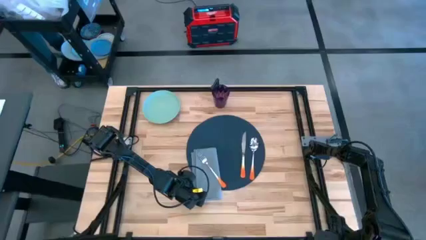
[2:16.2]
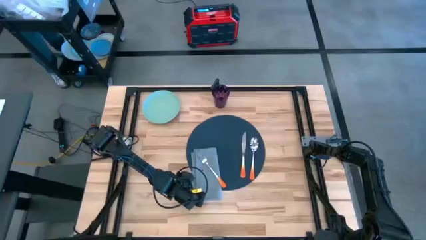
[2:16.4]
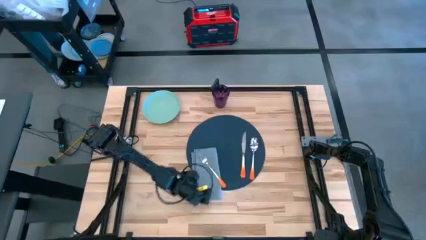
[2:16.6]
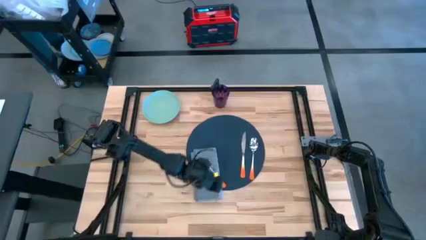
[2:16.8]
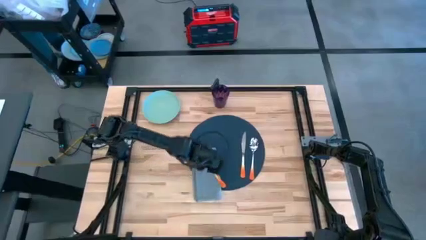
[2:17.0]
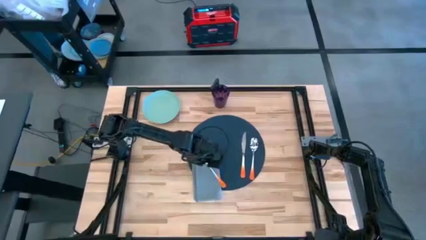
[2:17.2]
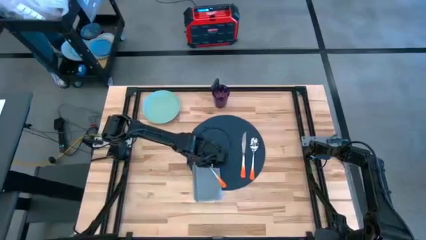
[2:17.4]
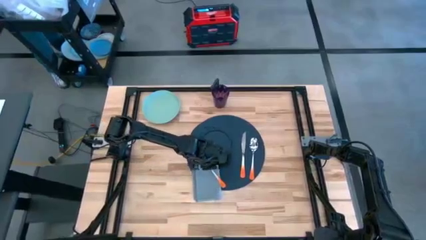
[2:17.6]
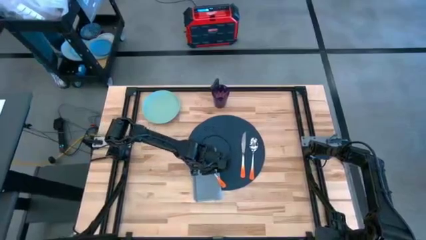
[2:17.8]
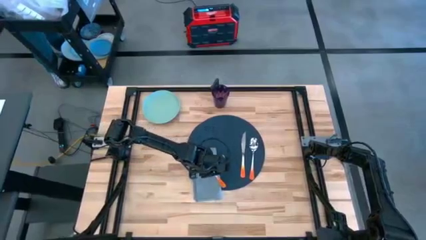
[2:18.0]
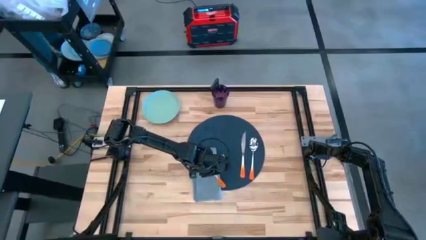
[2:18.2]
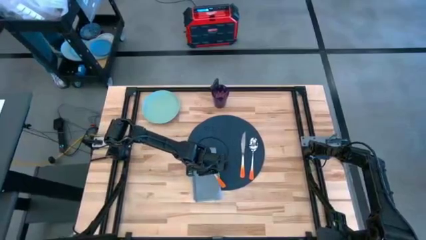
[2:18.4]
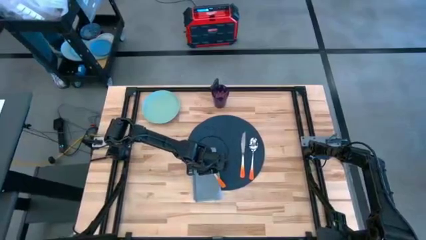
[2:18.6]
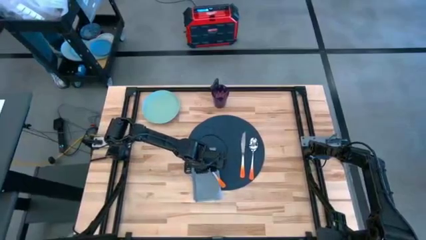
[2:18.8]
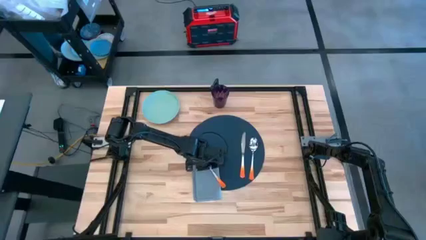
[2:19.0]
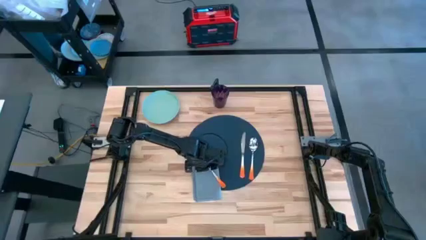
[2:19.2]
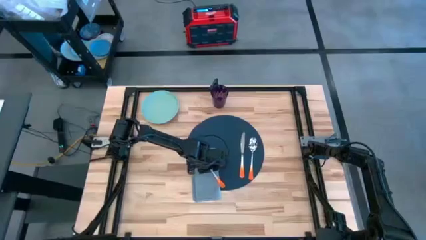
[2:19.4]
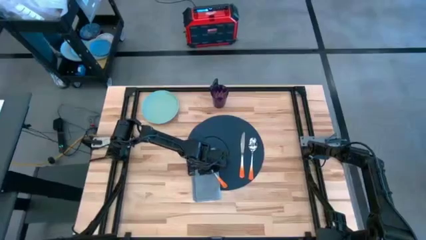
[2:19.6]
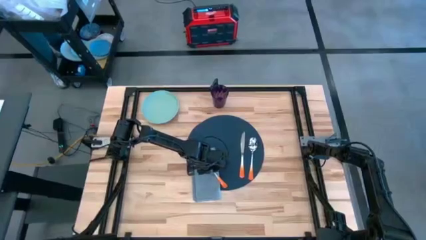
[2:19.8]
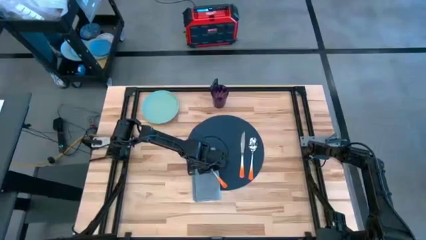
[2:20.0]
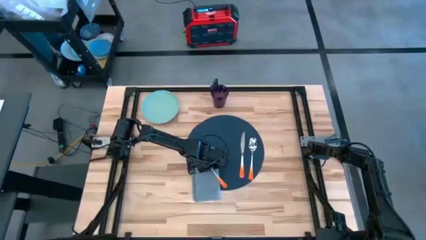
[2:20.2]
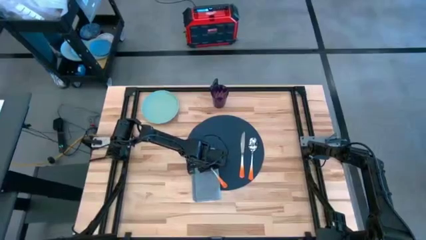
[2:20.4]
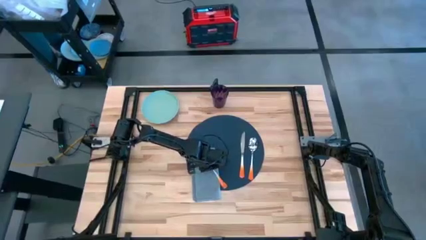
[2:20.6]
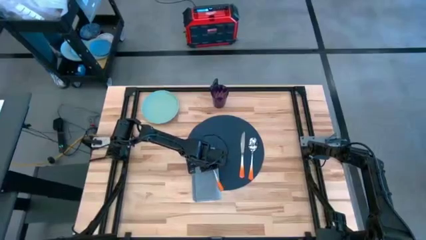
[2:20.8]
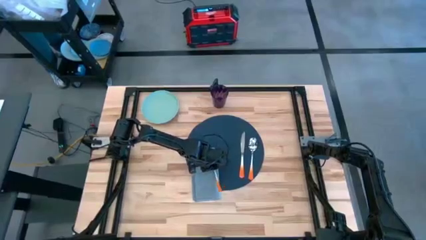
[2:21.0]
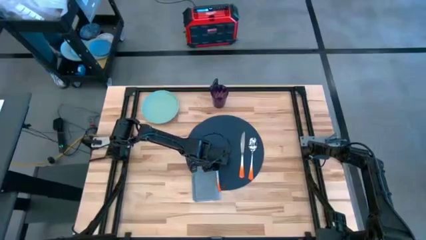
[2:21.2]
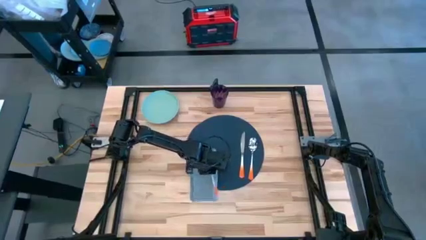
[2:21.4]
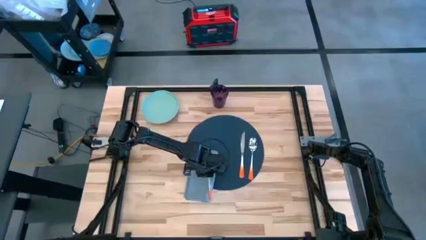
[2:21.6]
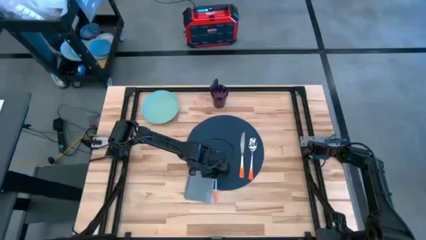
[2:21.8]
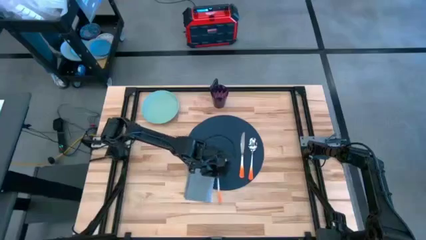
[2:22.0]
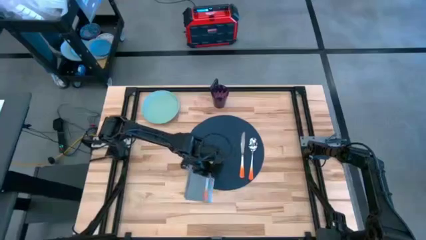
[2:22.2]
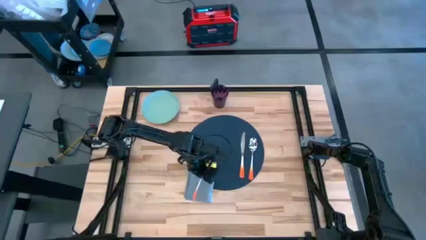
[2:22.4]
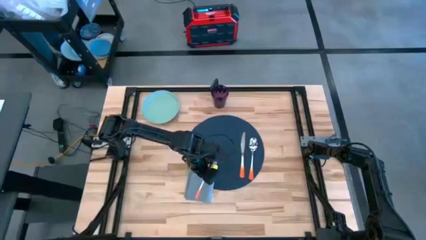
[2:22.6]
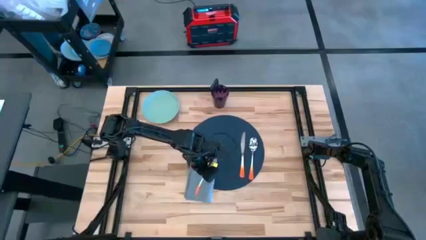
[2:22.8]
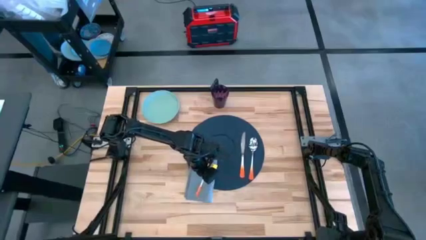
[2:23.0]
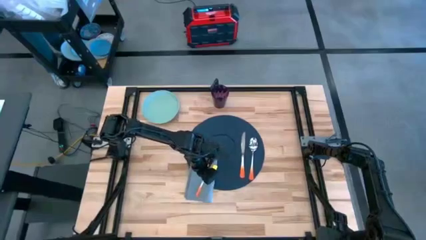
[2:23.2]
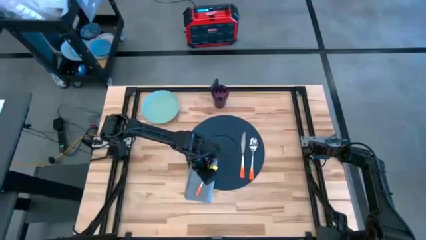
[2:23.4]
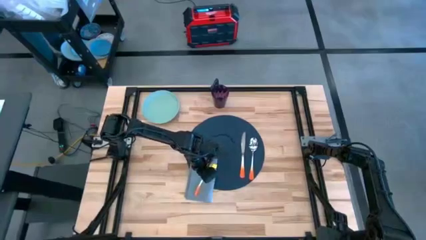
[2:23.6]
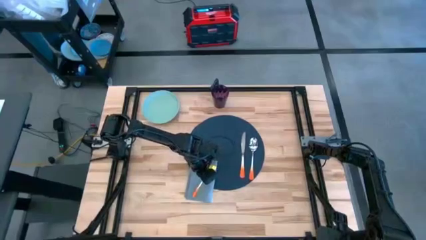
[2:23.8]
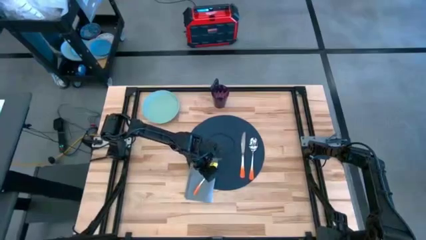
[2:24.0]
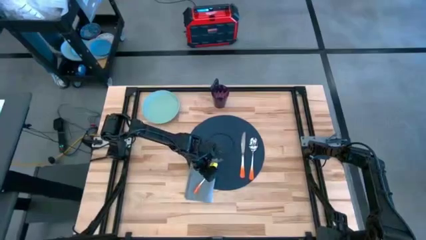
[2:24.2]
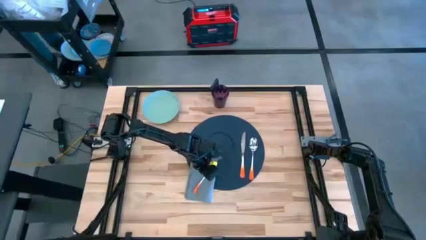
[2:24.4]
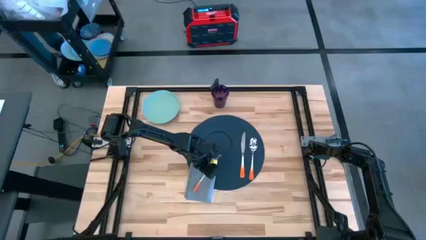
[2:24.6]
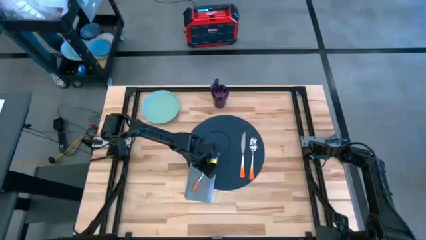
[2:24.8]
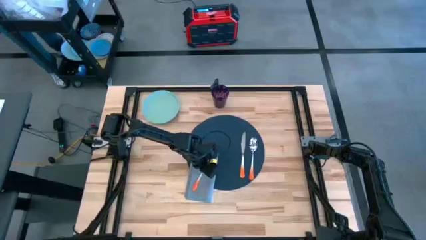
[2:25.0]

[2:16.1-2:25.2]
Task: Set table place
Adjust the orange fork on the table napkin

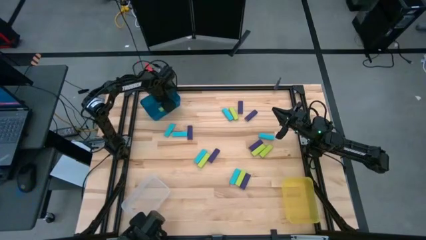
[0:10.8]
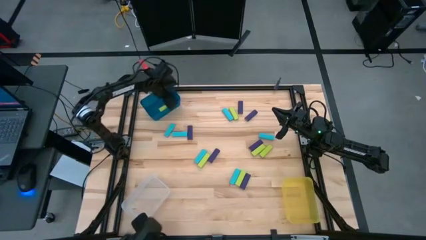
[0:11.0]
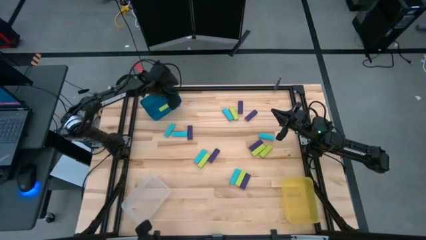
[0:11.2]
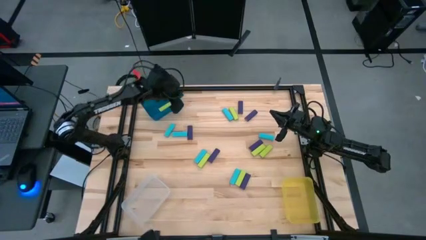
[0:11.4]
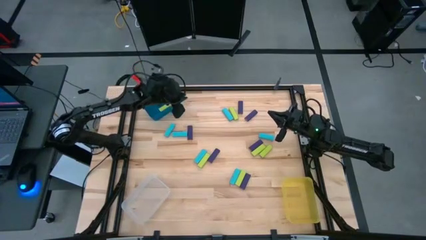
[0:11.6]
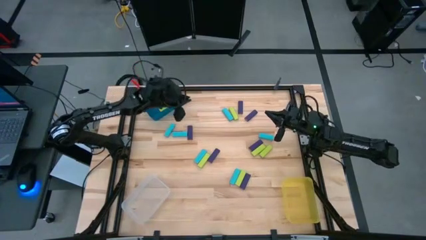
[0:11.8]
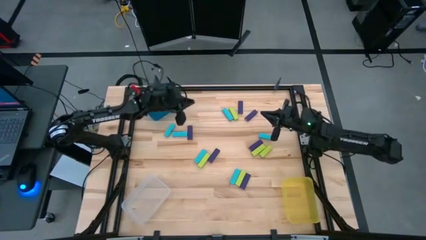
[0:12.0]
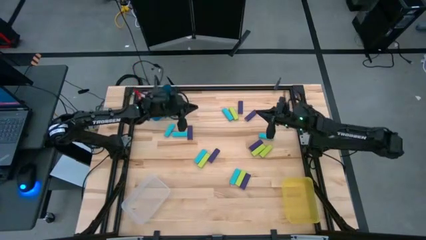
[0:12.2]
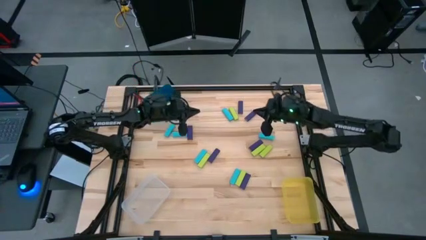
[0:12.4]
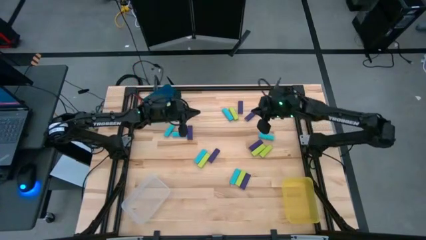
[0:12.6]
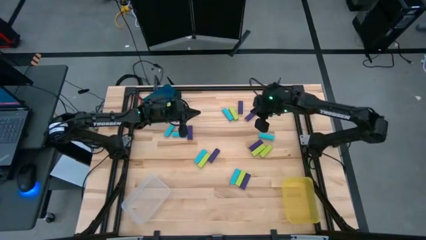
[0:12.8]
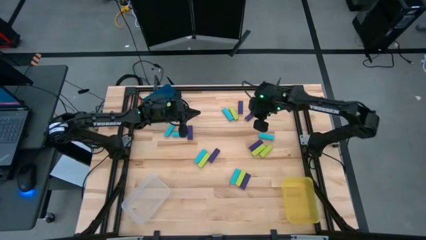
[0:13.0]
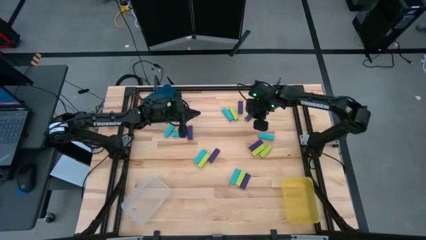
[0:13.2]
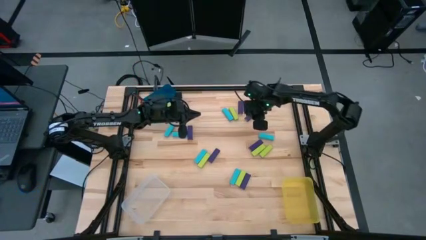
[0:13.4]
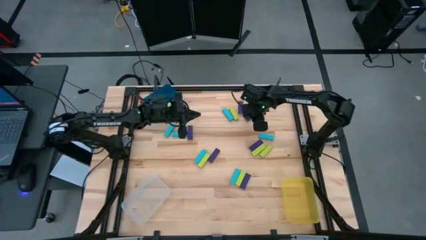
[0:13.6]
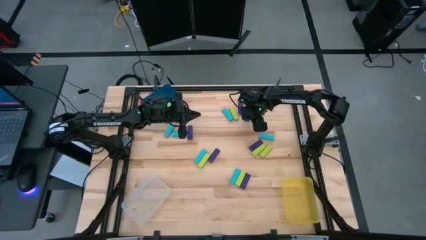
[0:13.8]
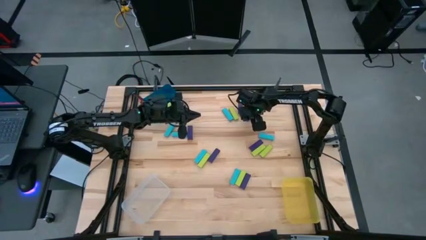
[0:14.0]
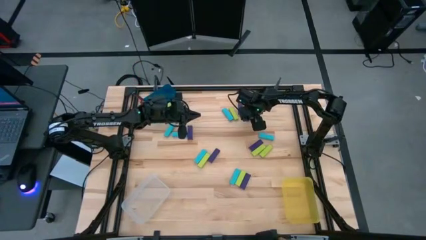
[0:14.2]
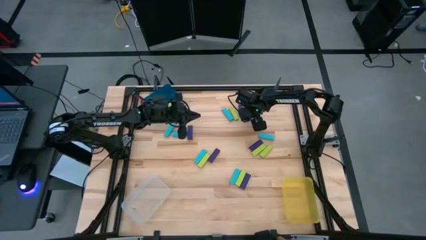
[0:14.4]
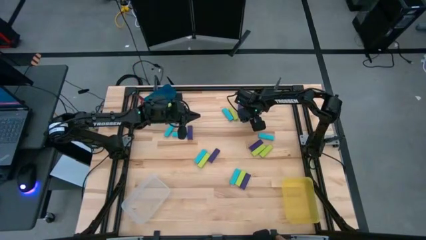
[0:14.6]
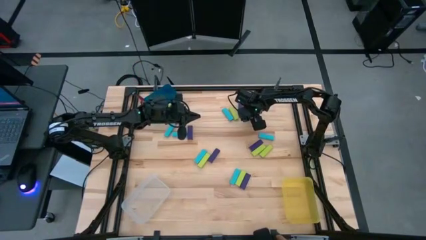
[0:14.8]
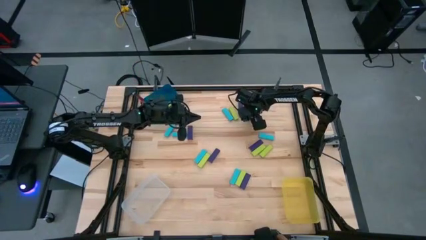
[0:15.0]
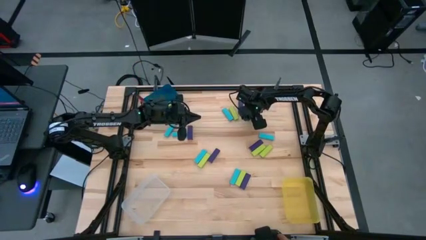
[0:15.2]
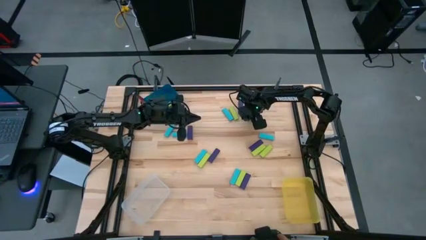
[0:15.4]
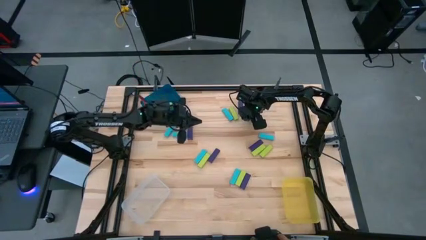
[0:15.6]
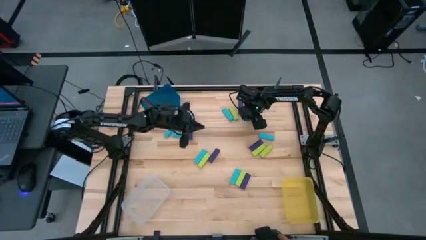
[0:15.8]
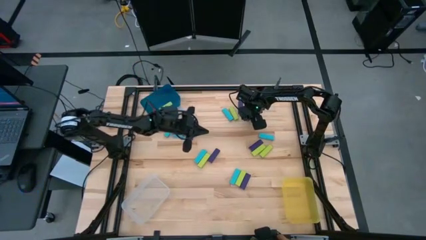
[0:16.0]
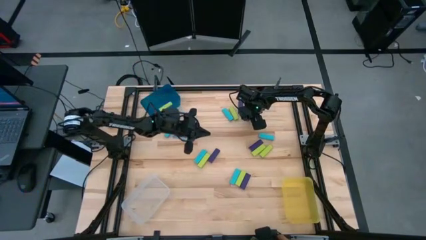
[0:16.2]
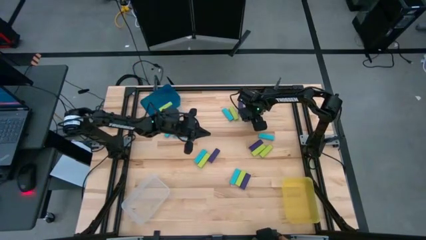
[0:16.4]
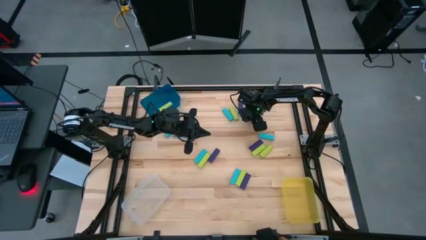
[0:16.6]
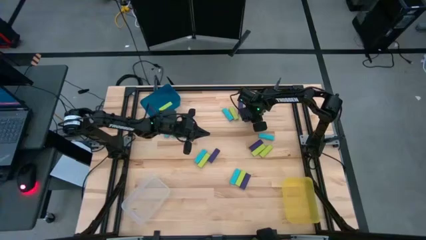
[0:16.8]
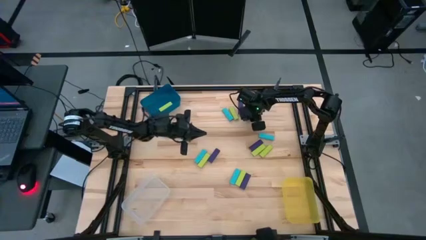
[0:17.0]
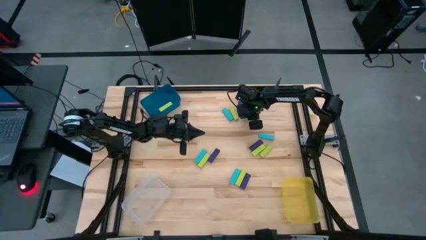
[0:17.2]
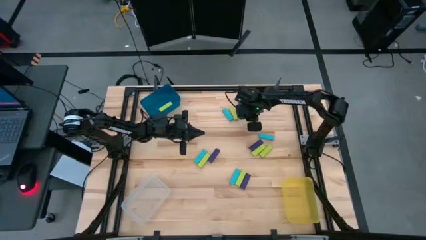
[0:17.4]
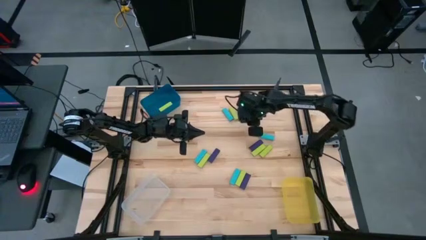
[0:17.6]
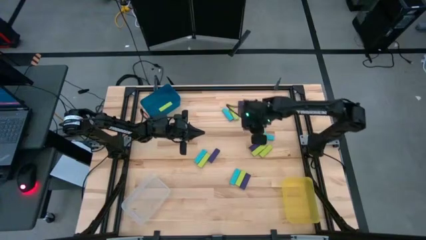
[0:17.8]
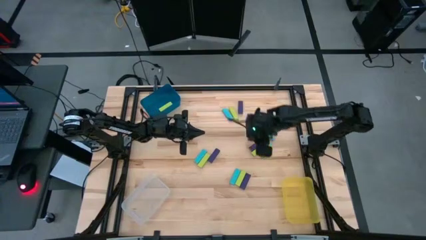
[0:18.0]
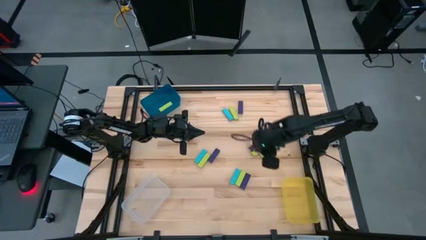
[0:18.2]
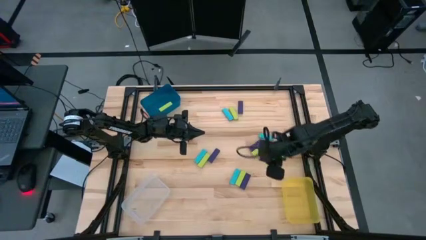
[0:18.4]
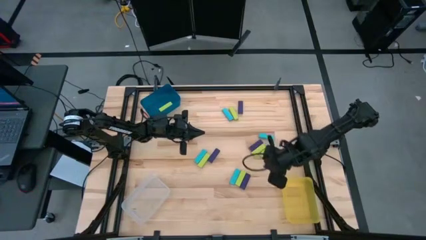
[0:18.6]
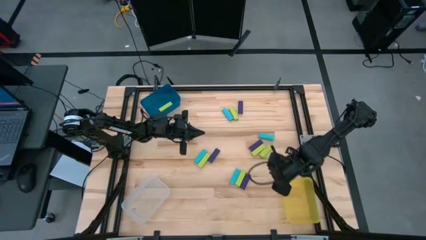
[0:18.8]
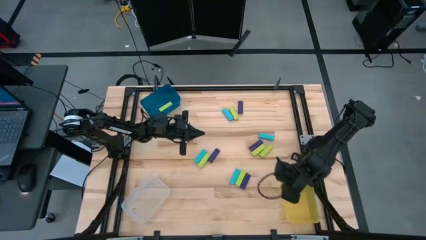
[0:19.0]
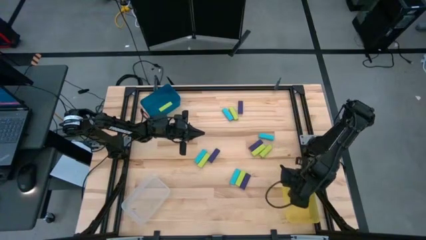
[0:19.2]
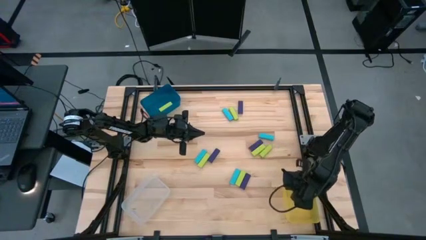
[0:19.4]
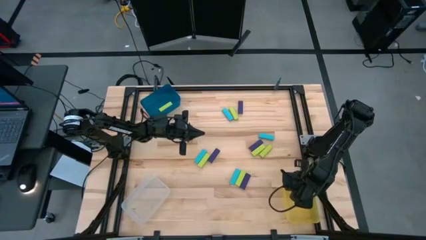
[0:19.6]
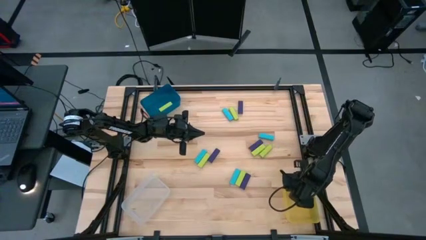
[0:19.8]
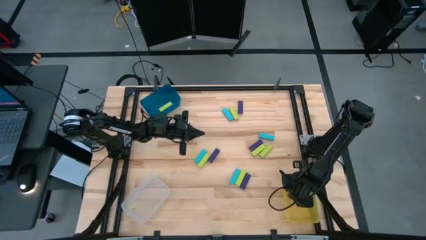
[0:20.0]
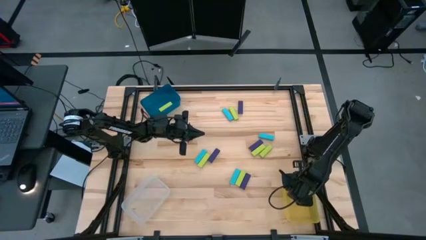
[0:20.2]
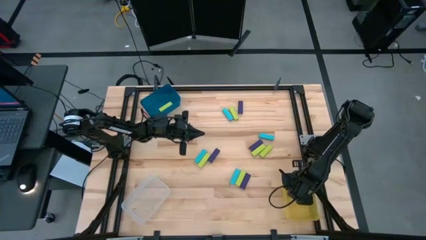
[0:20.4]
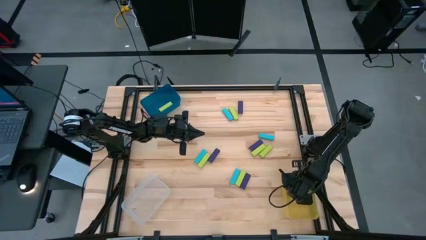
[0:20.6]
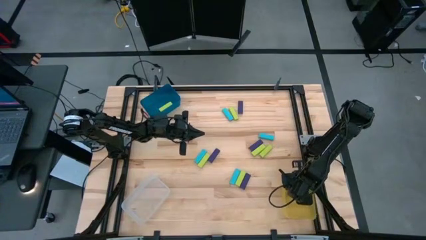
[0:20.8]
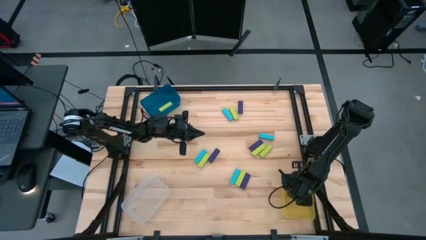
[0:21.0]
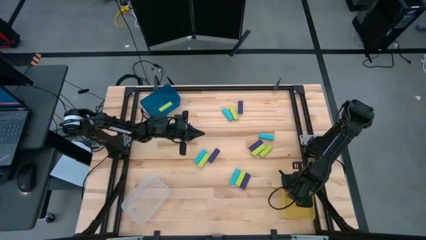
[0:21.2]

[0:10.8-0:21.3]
Task: Sort blocks
Put the violet block into the yellow bin
